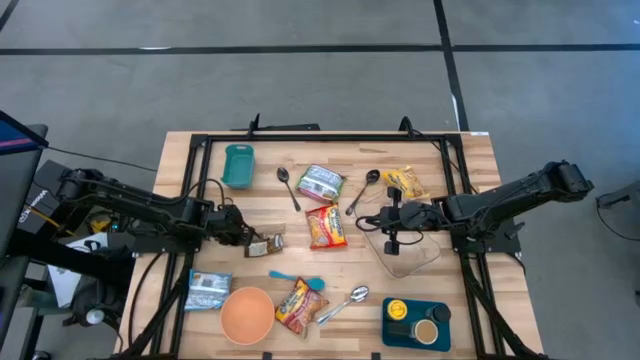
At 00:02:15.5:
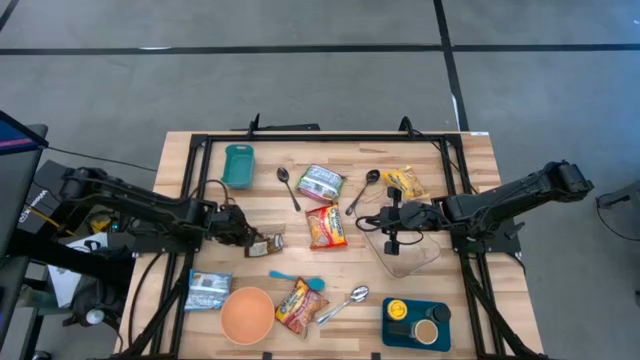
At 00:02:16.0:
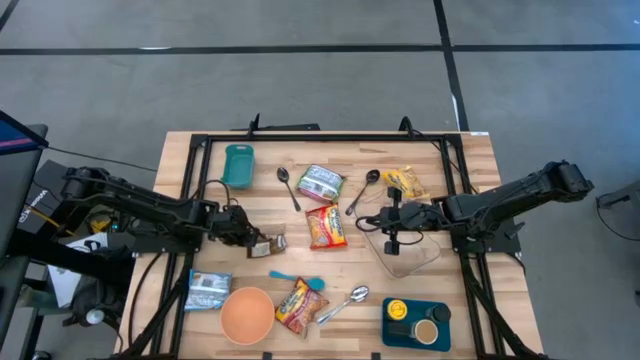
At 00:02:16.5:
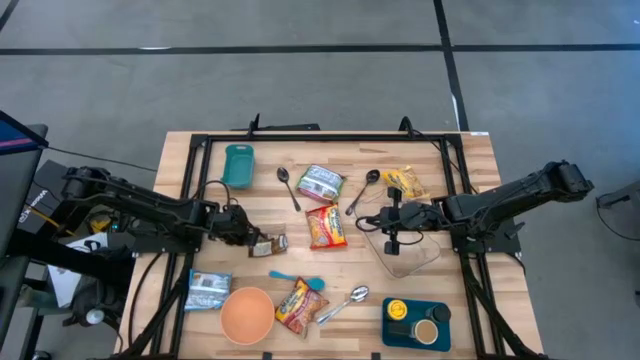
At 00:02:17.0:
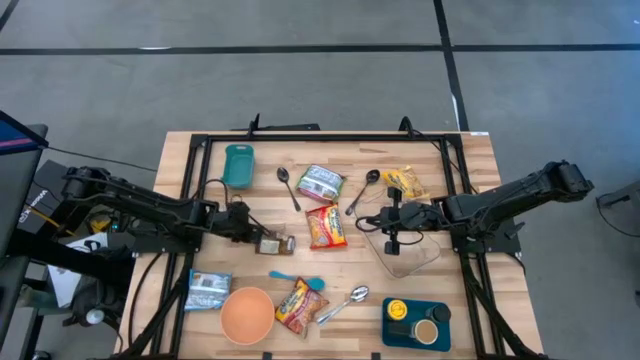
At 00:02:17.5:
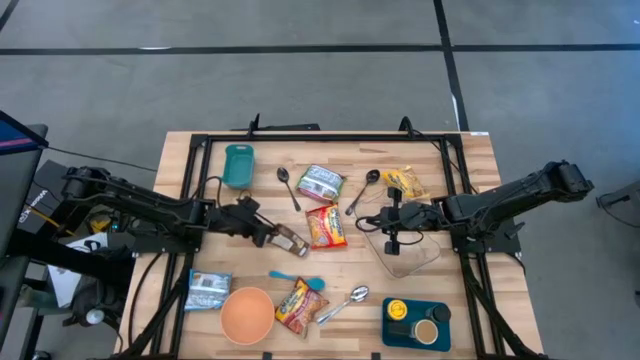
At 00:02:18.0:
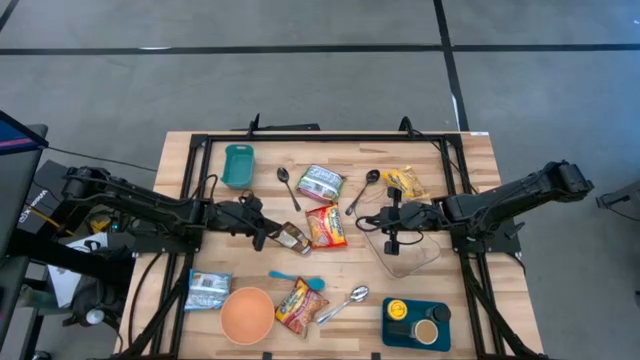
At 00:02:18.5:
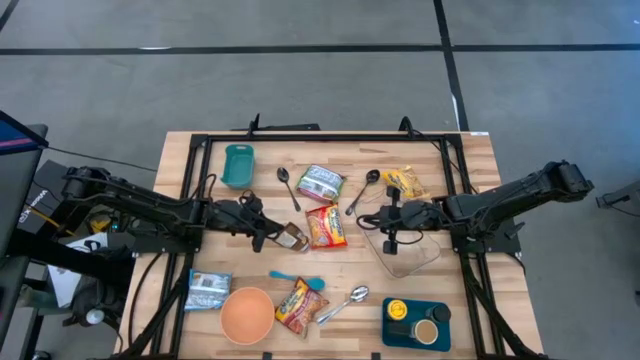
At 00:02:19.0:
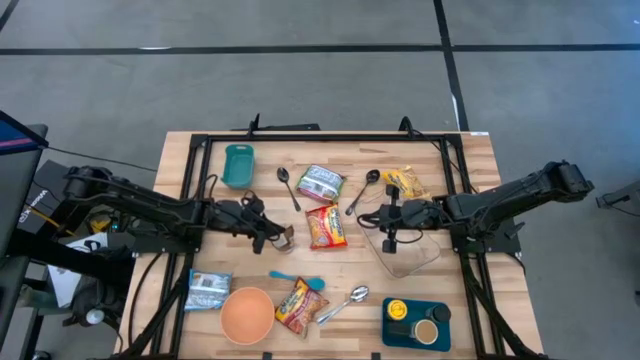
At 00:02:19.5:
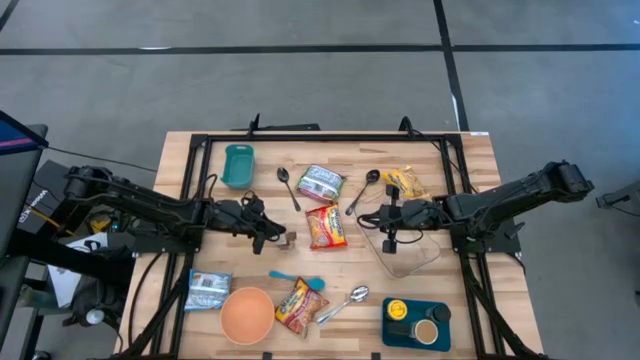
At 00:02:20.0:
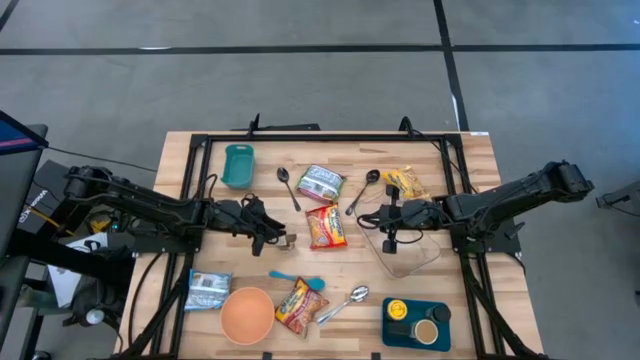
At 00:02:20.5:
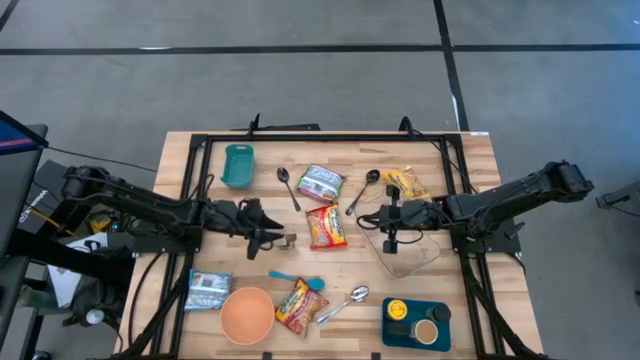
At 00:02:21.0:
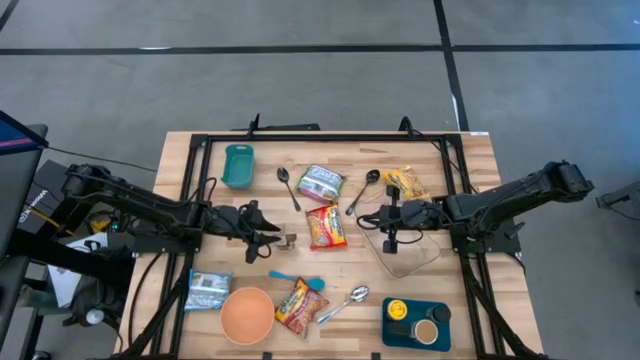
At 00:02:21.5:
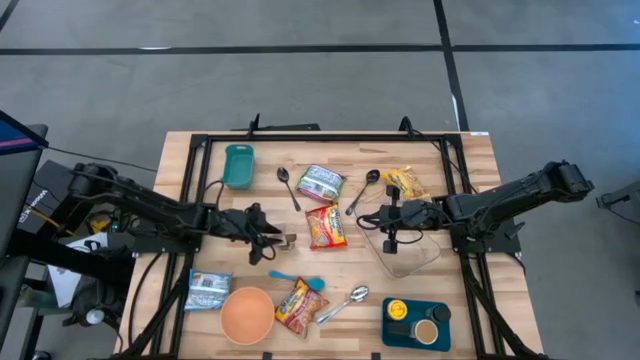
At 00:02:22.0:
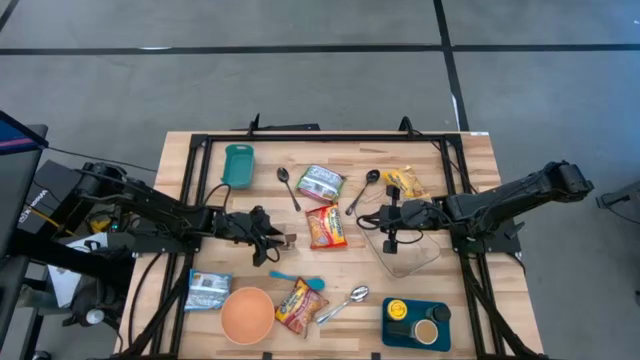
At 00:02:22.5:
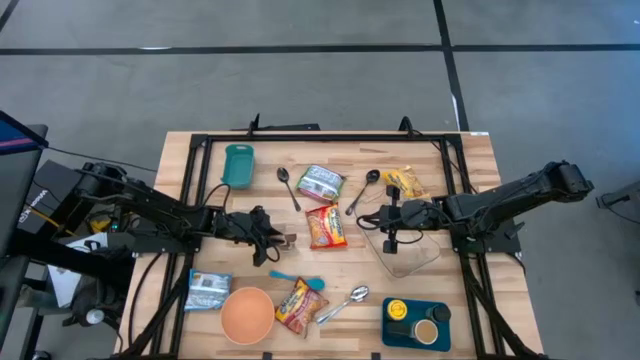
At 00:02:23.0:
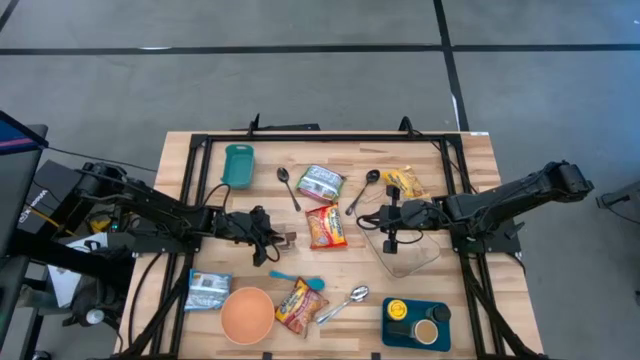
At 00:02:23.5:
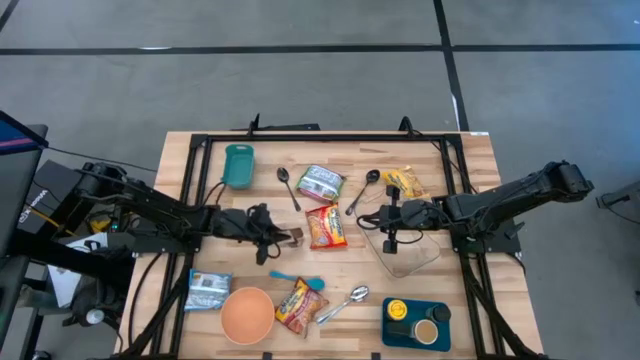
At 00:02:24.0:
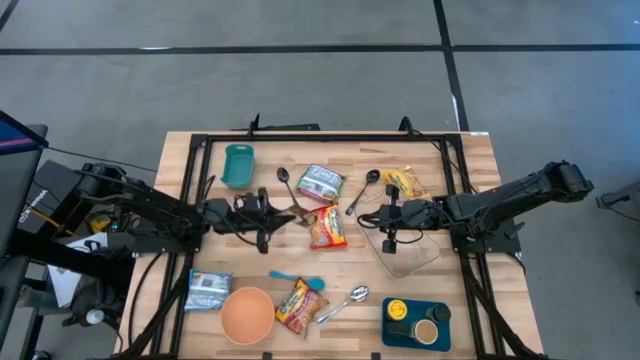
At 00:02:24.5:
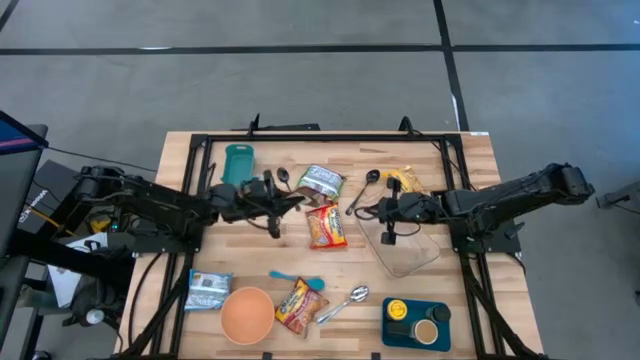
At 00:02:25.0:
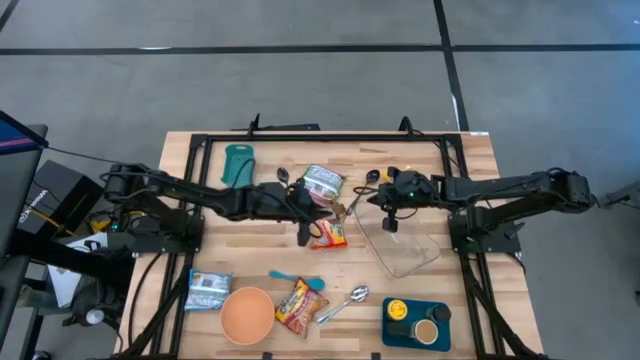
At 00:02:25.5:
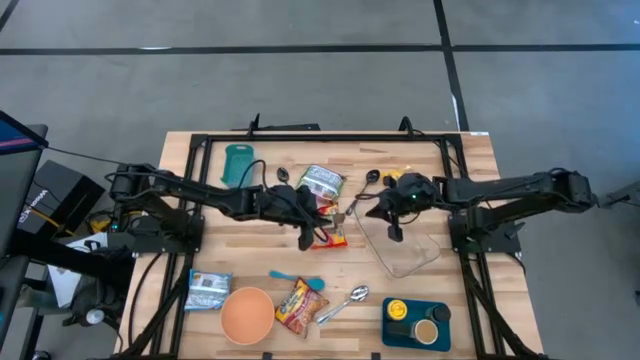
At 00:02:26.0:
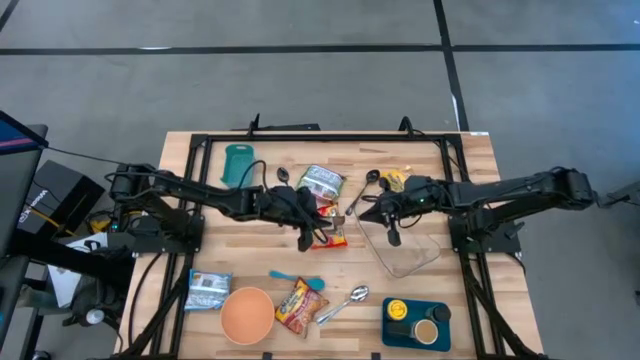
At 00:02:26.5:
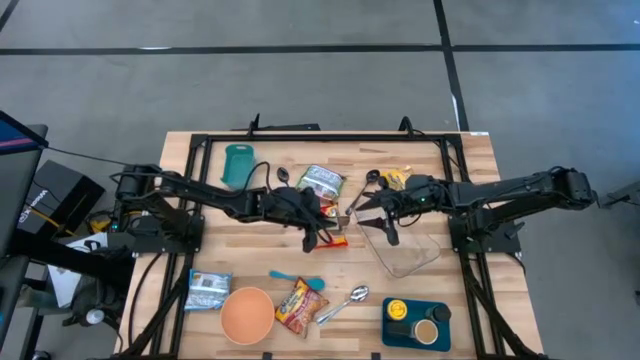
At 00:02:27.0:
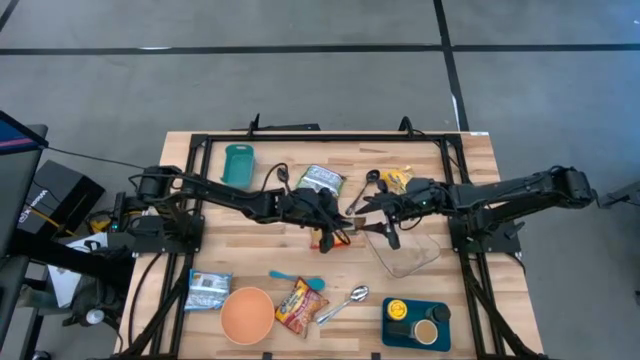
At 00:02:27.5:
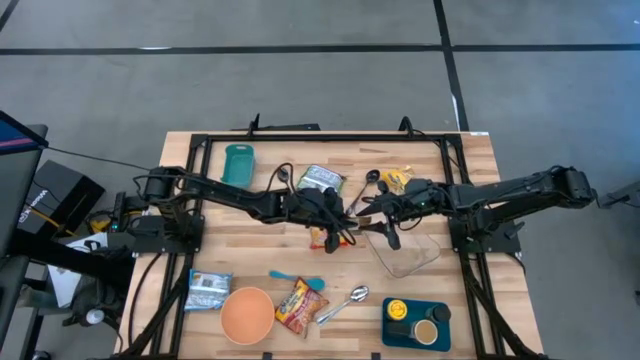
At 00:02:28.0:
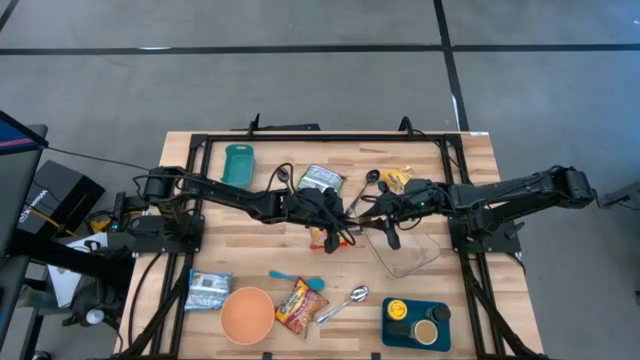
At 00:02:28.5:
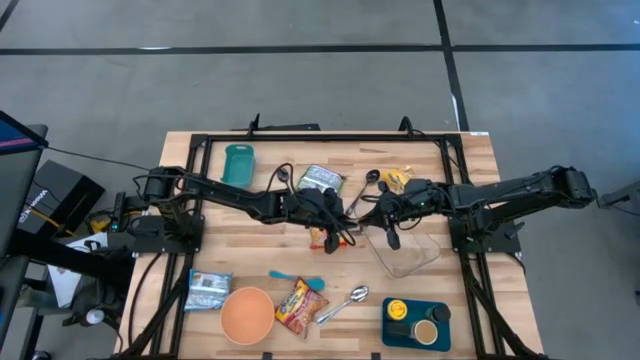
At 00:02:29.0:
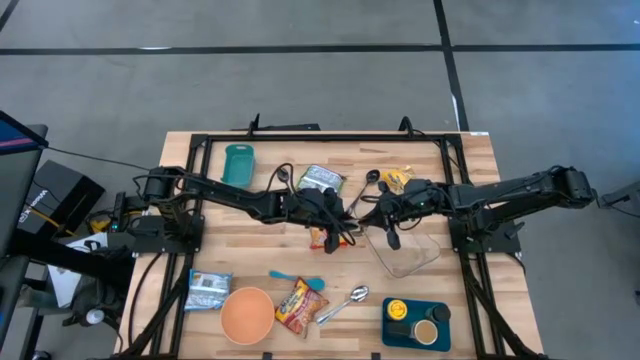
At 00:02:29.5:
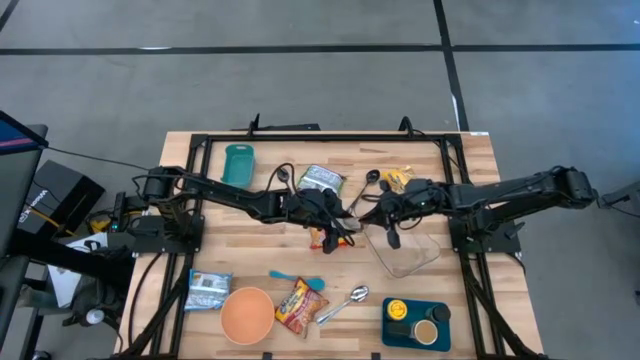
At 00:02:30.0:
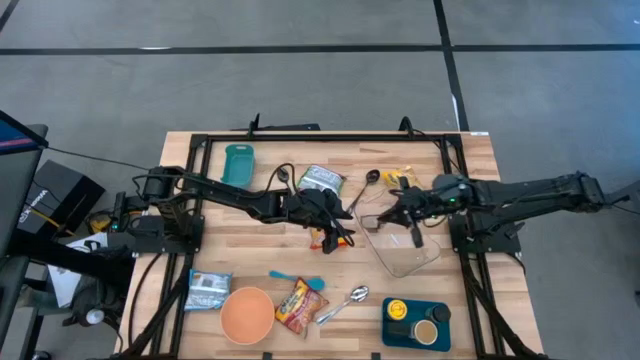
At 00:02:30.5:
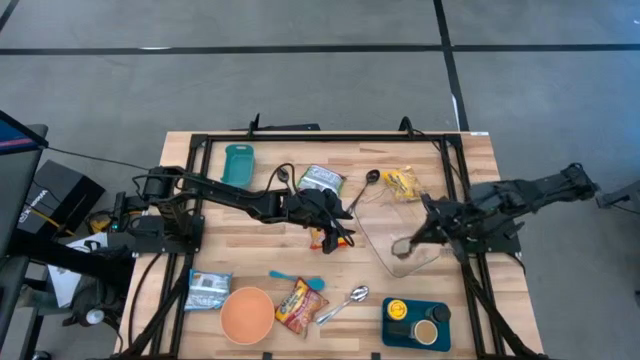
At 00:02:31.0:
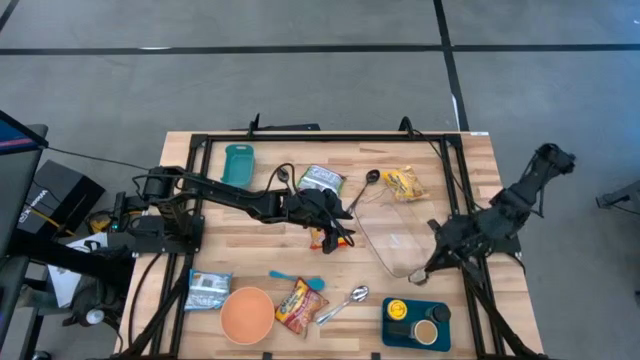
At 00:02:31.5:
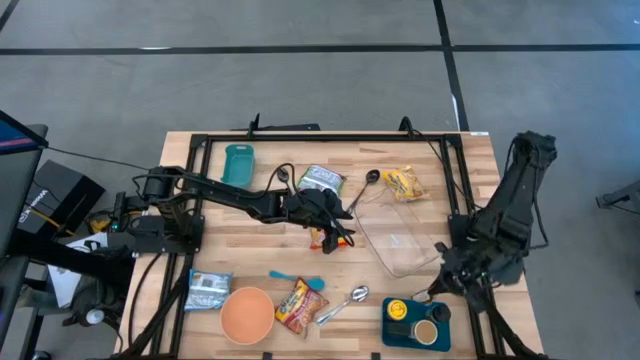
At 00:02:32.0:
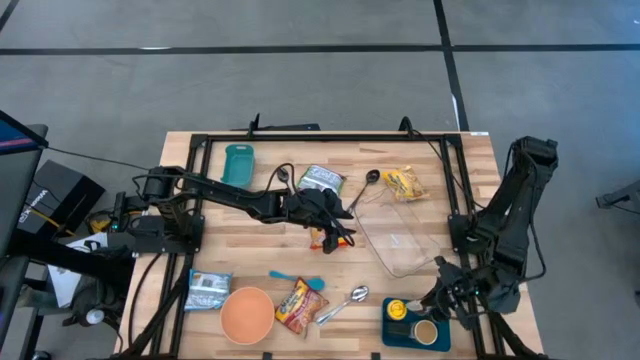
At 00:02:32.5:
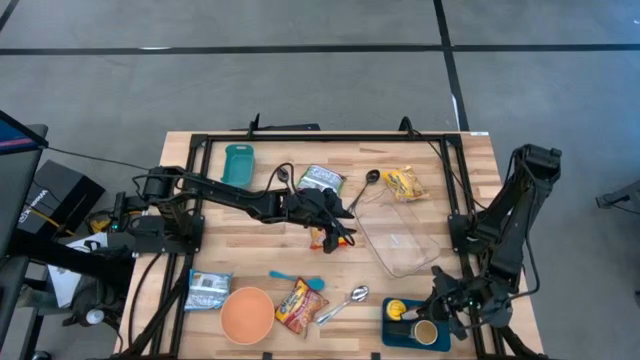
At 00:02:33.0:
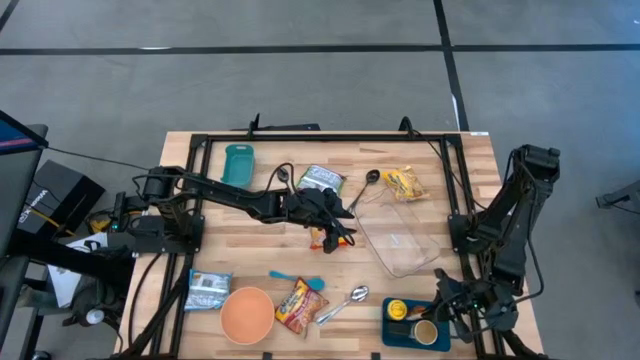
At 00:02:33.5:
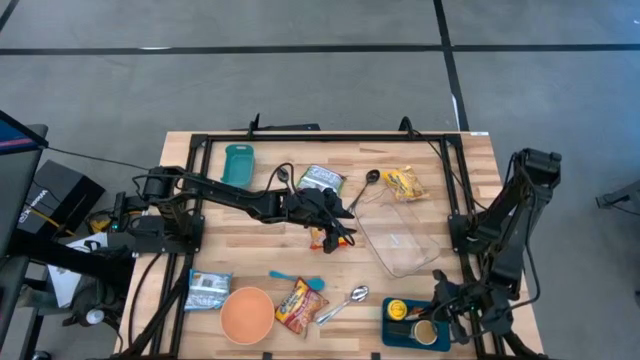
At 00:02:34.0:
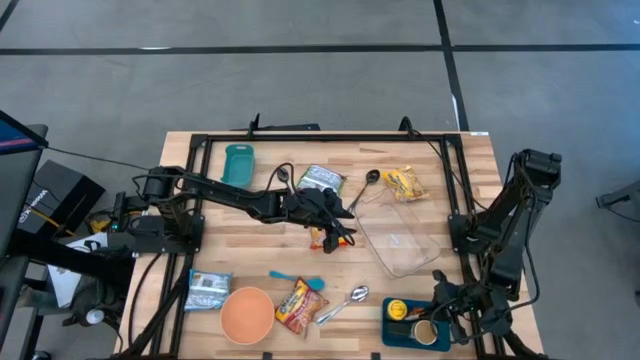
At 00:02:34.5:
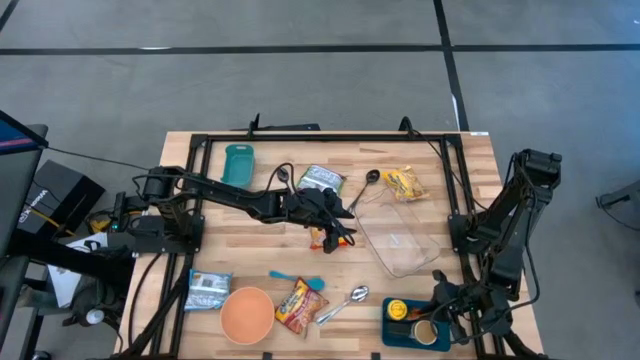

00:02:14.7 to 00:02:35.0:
Task: Pick & Place Food Item
Put the orange spice pack into the blue bin

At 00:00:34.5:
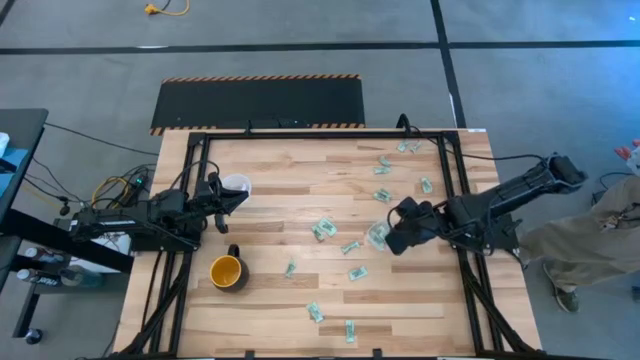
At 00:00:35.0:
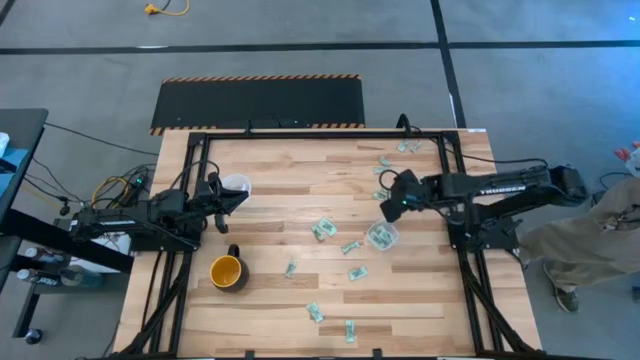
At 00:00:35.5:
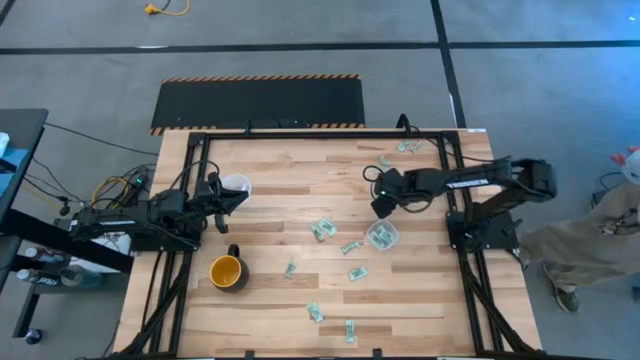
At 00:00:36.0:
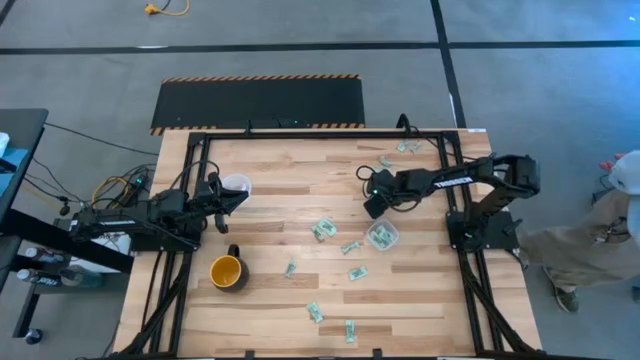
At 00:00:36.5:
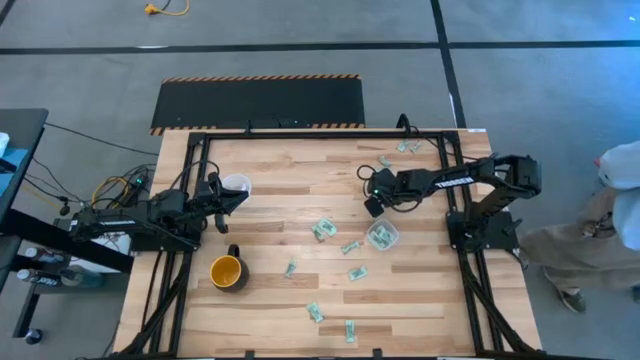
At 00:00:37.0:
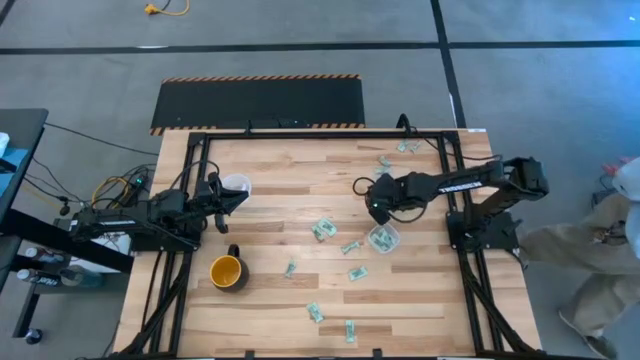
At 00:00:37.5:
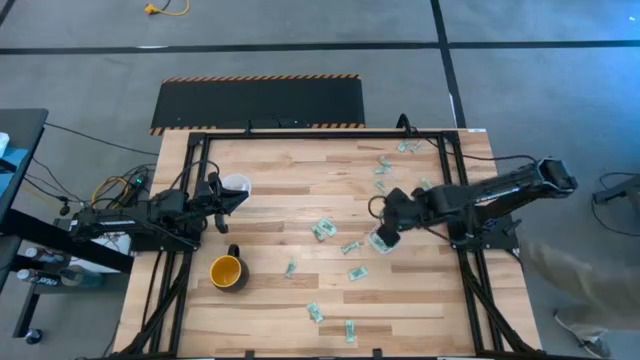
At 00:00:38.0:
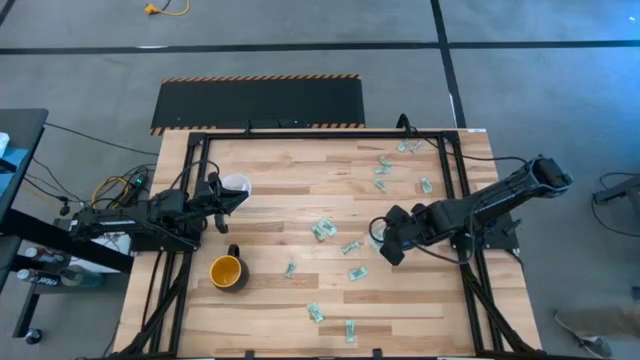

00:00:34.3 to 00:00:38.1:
Task: Pick and place Stevia / Truvia into bins
Put the white stevia packet into the square transparent container
